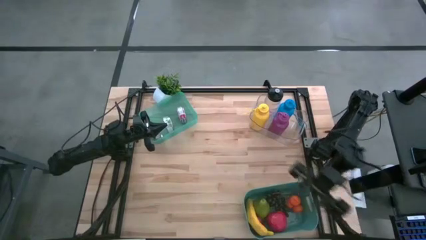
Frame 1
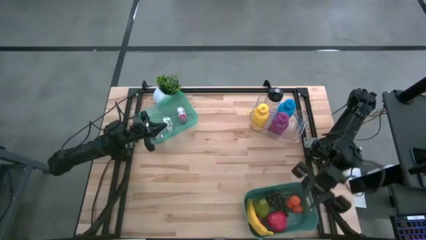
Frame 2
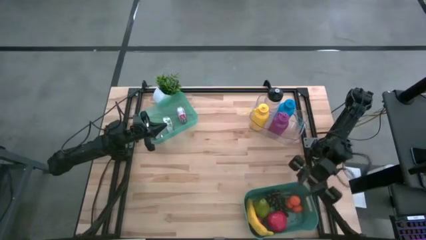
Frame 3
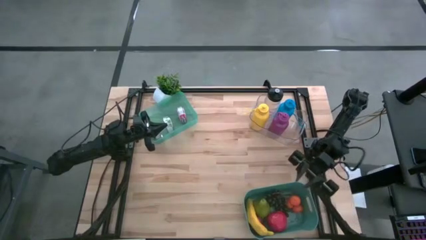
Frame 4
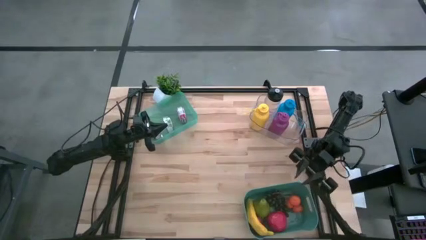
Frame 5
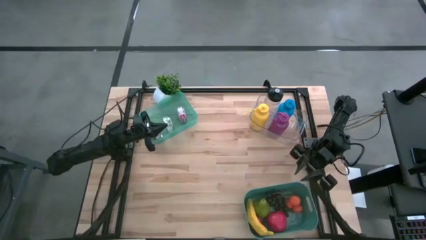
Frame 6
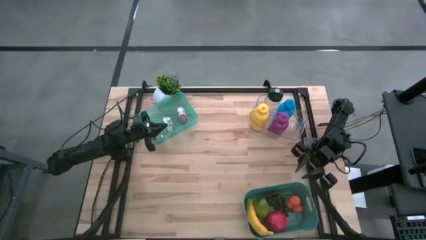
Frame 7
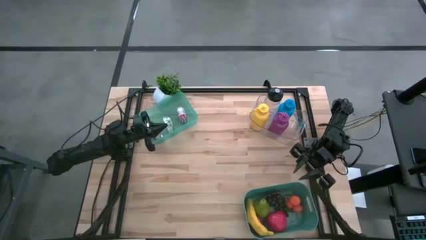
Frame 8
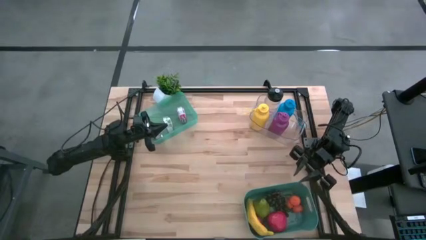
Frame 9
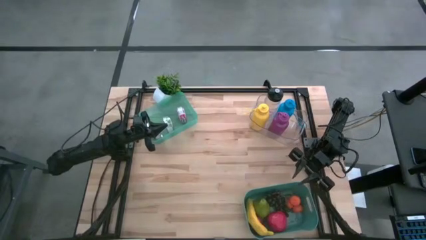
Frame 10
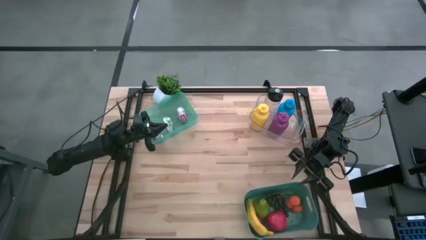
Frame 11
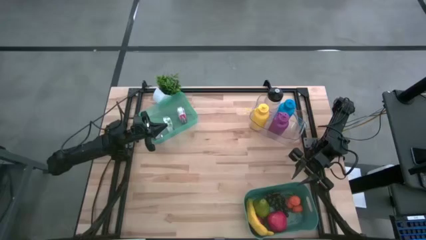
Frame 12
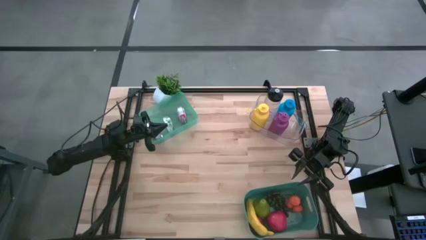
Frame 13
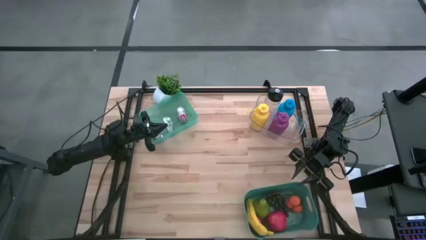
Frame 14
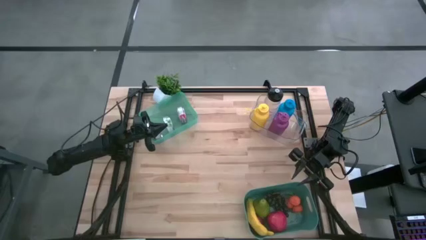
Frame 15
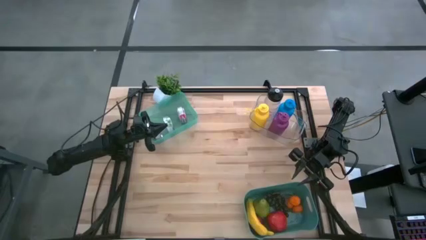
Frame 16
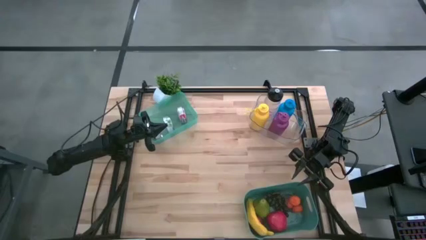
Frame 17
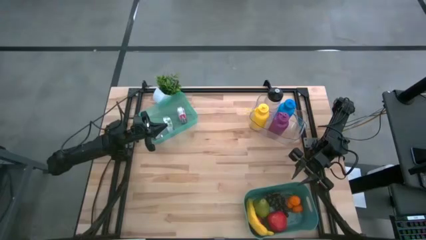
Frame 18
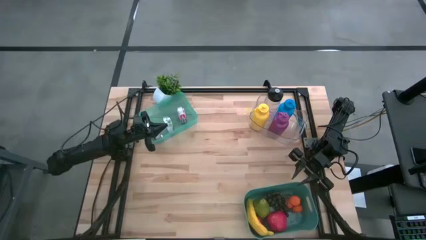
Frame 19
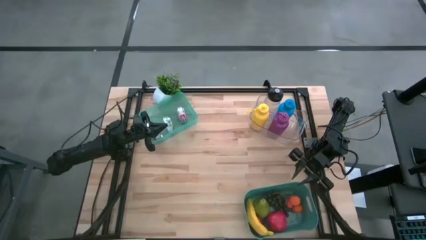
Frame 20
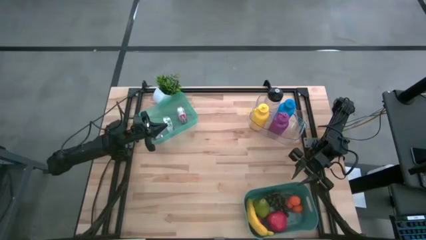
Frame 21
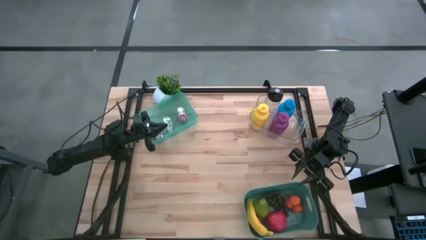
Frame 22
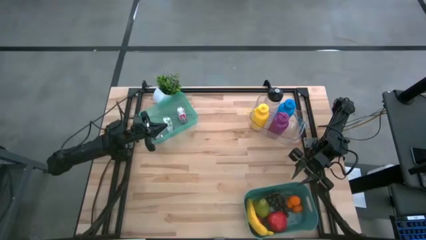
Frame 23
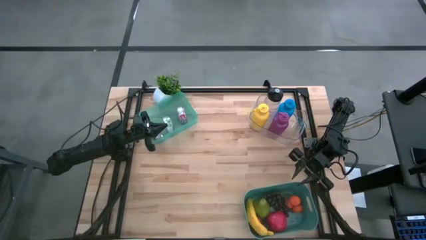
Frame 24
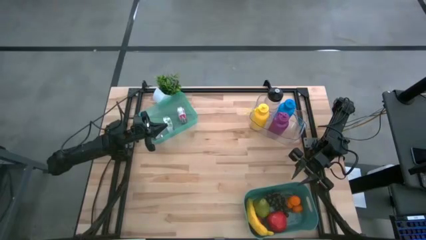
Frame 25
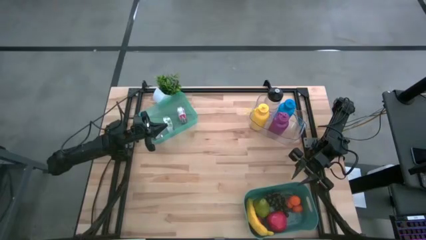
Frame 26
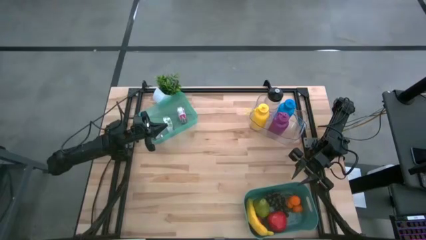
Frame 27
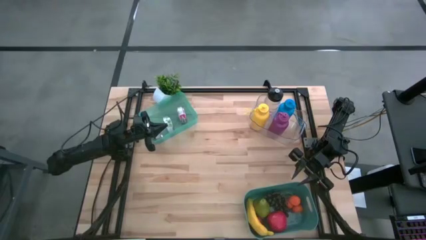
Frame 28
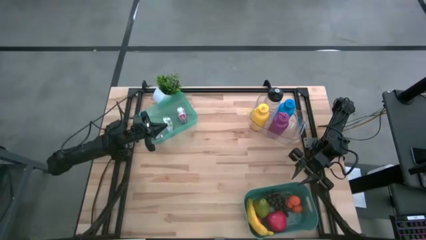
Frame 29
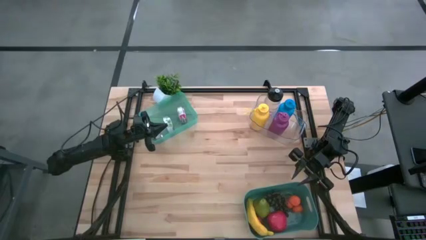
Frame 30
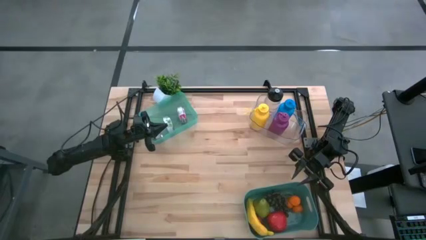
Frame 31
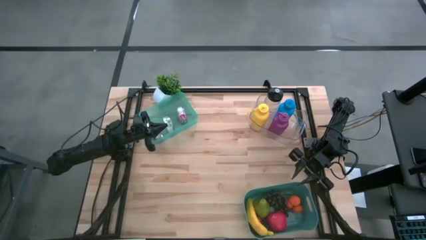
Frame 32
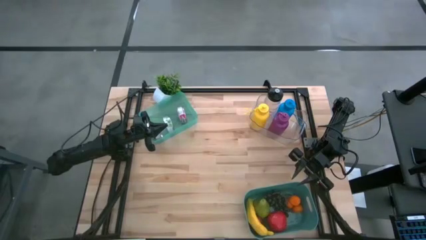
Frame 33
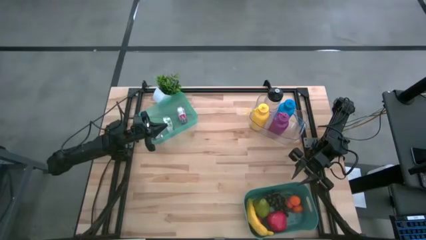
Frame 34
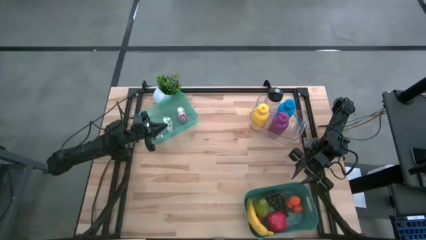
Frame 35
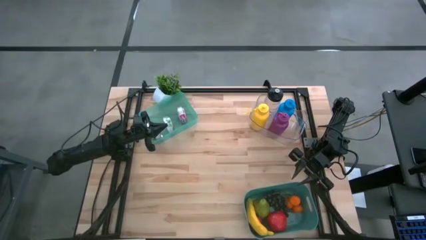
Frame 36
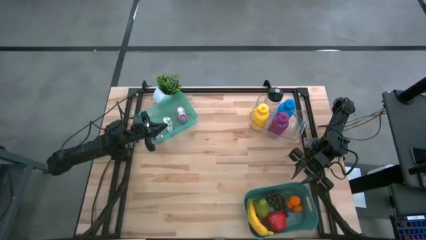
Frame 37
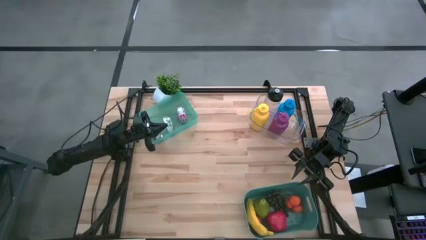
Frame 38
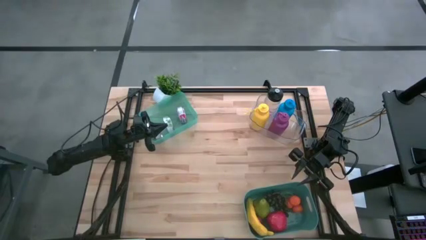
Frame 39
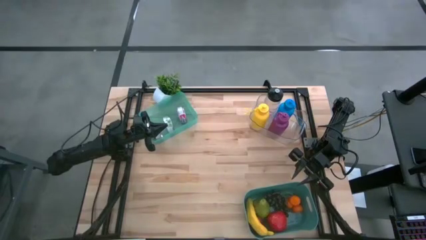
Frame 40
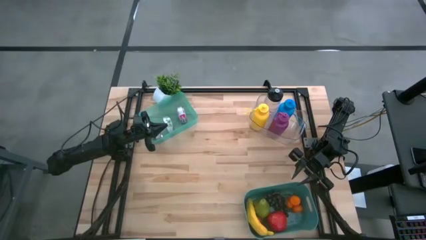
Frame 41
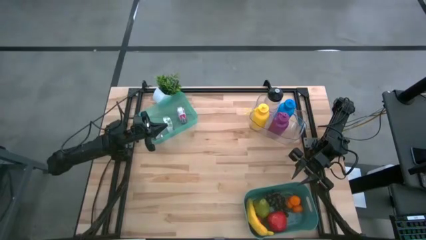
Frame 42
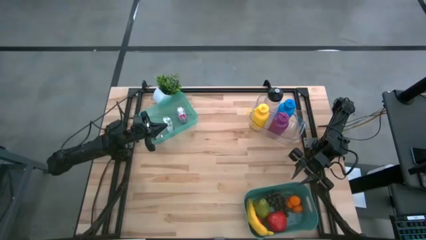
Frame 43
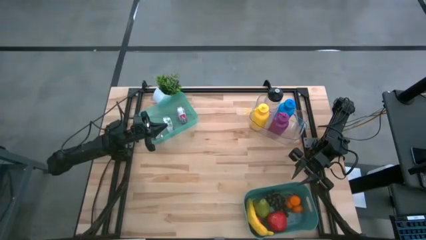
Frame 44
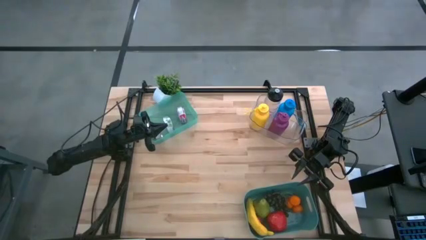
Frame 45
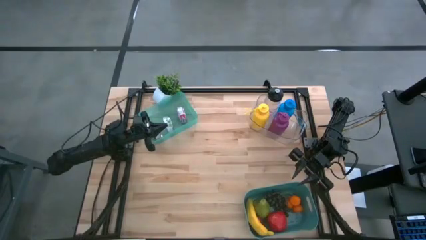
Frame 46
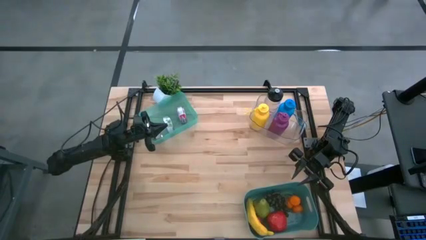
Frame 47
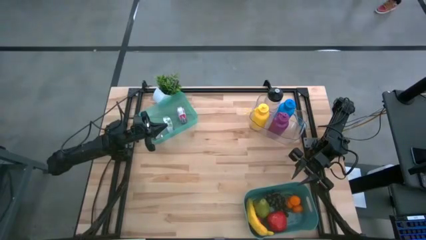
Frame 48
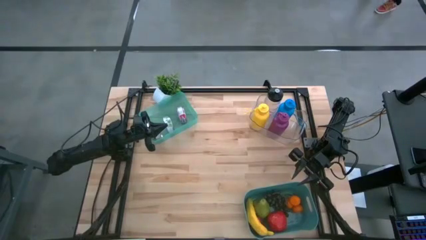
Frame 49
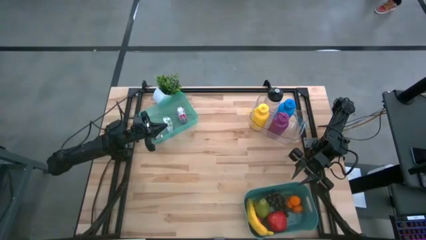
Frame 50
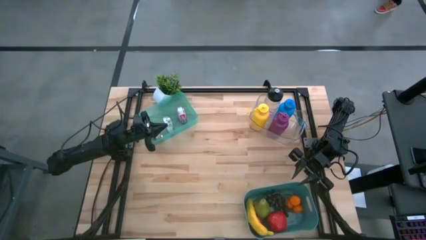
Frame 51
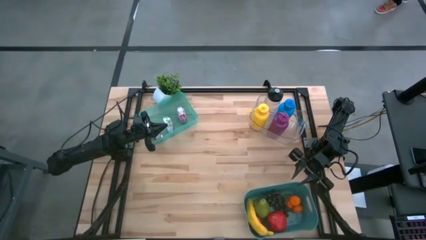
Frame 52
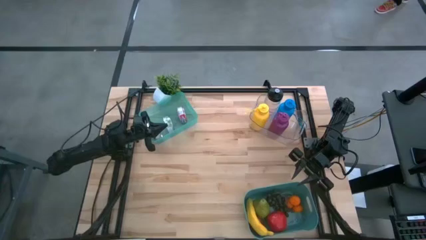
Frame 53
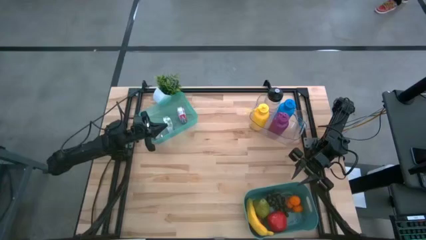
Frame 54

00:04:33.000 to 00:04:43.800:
Task: Pick & Place Food Item
Return to Home Position
